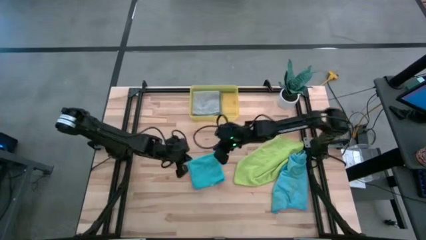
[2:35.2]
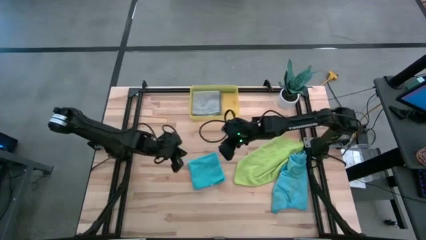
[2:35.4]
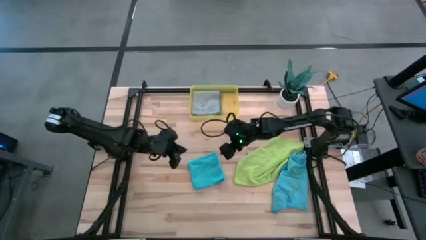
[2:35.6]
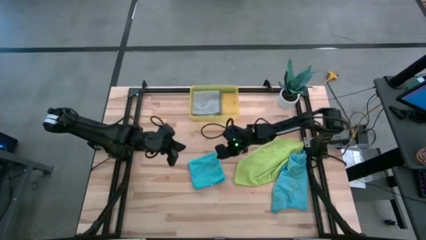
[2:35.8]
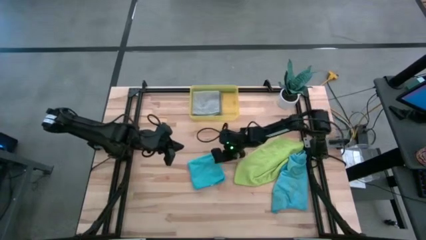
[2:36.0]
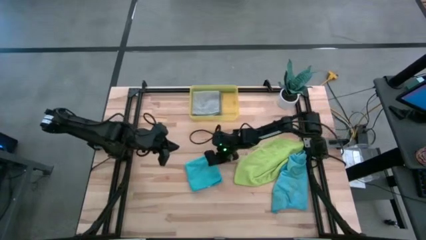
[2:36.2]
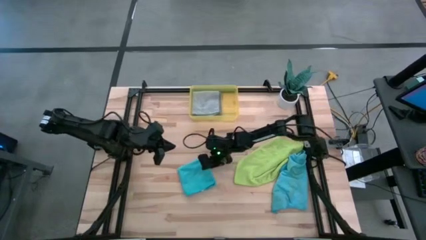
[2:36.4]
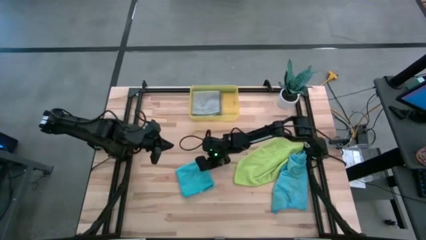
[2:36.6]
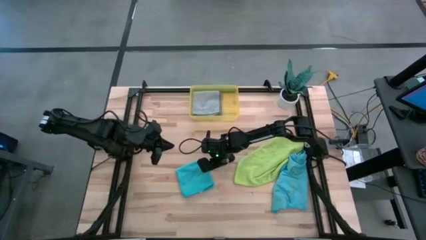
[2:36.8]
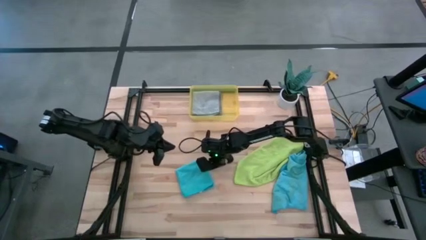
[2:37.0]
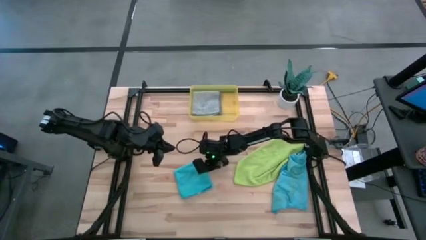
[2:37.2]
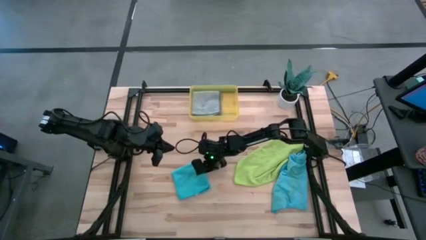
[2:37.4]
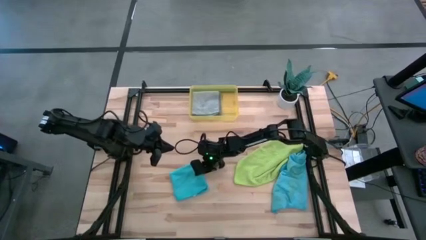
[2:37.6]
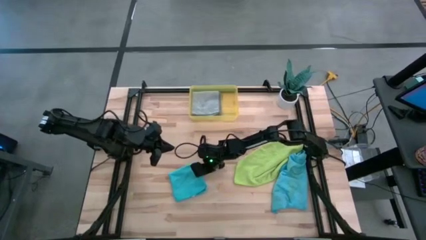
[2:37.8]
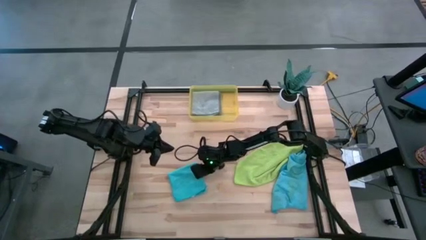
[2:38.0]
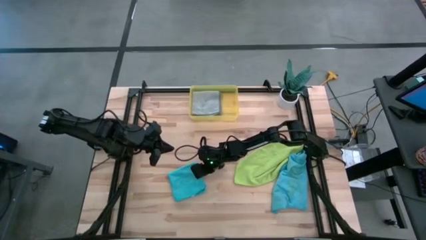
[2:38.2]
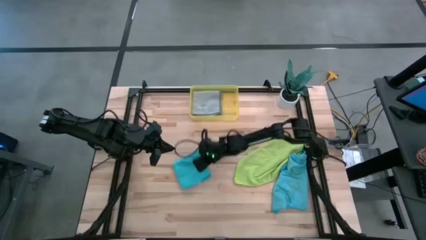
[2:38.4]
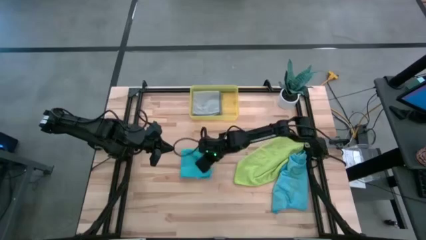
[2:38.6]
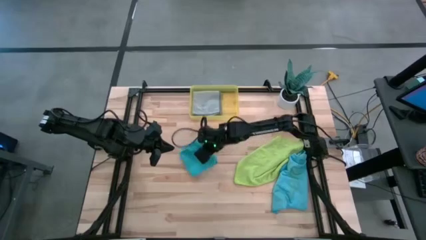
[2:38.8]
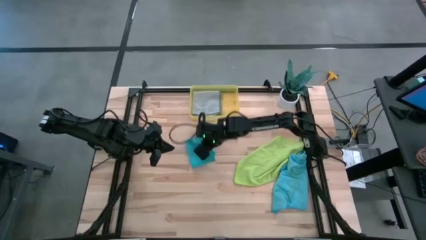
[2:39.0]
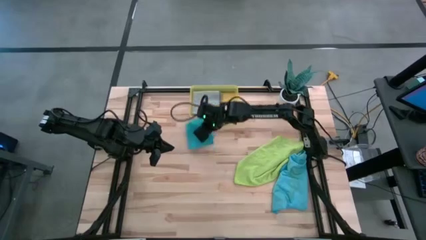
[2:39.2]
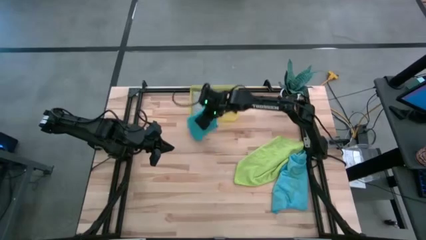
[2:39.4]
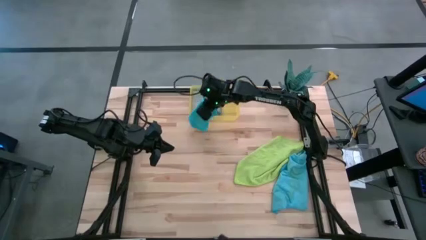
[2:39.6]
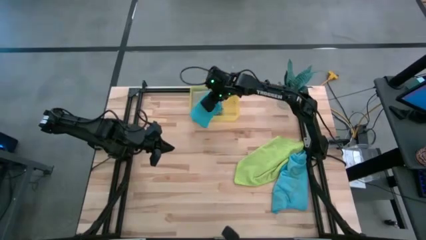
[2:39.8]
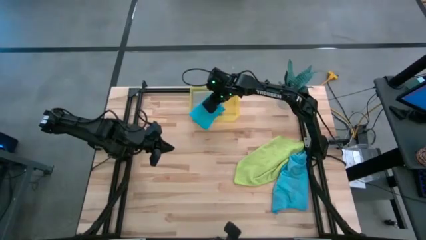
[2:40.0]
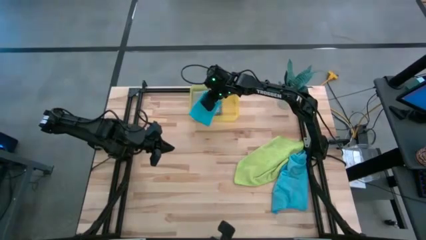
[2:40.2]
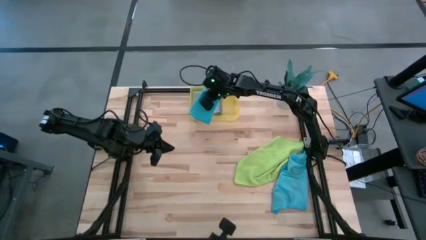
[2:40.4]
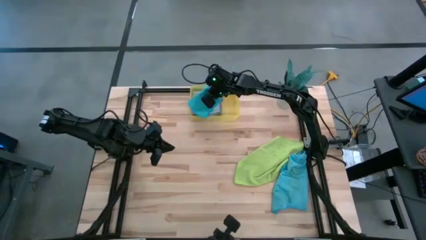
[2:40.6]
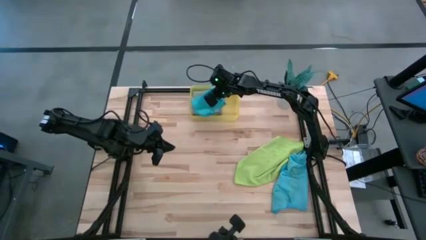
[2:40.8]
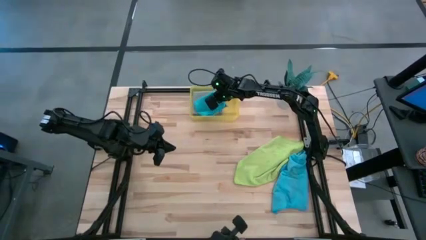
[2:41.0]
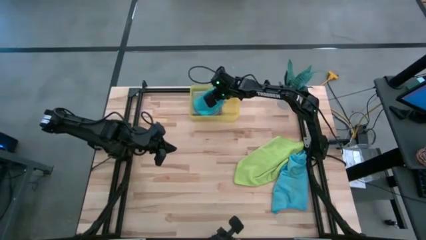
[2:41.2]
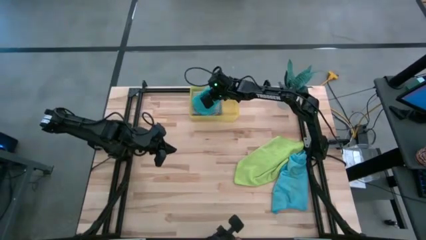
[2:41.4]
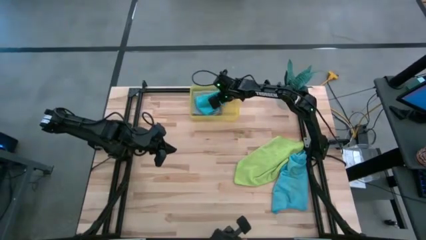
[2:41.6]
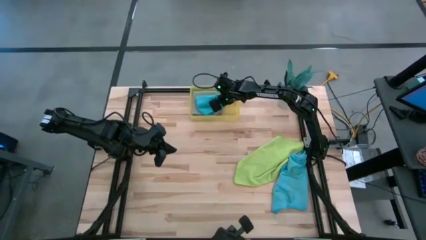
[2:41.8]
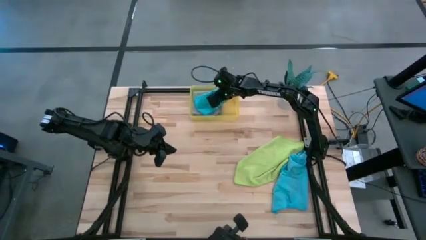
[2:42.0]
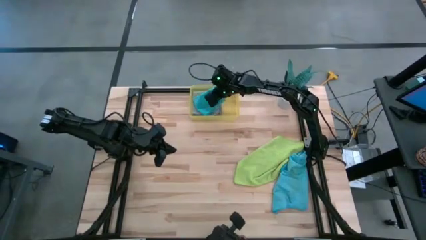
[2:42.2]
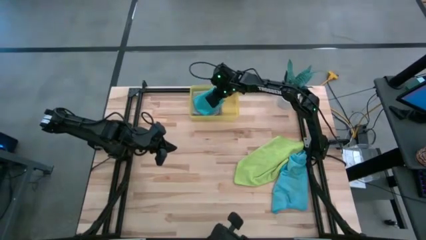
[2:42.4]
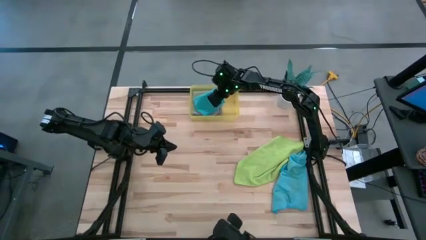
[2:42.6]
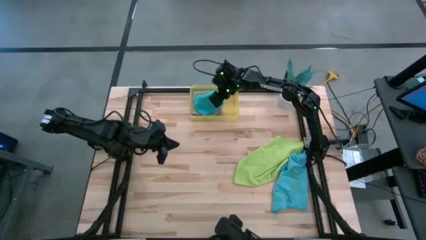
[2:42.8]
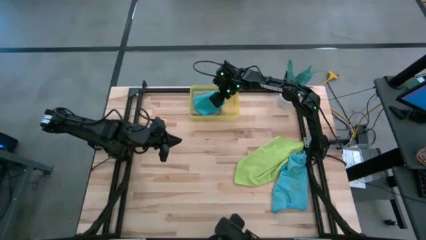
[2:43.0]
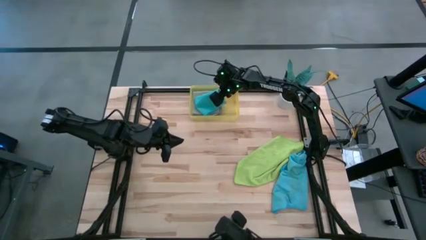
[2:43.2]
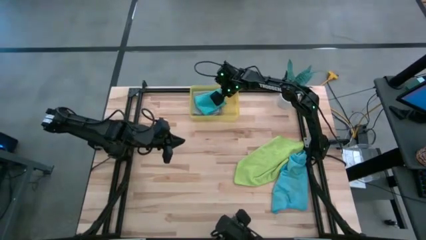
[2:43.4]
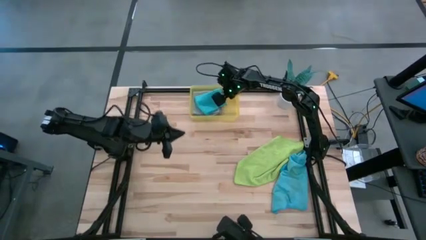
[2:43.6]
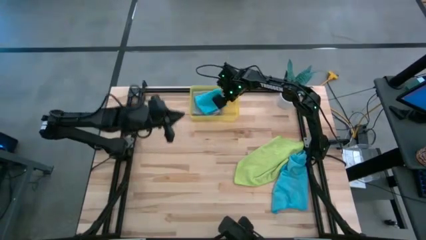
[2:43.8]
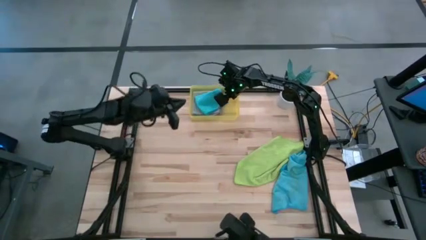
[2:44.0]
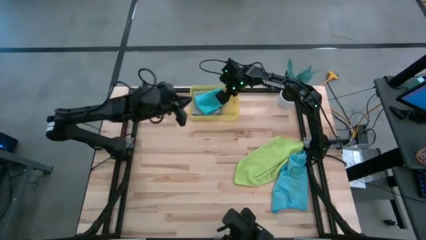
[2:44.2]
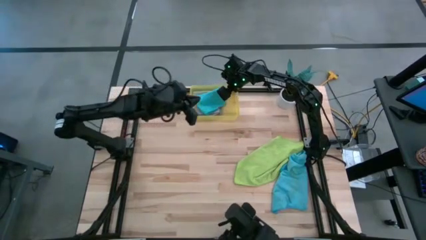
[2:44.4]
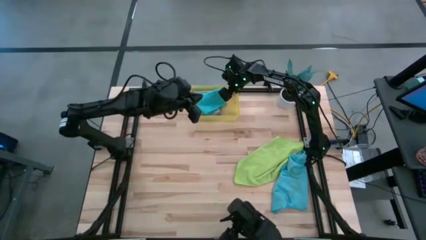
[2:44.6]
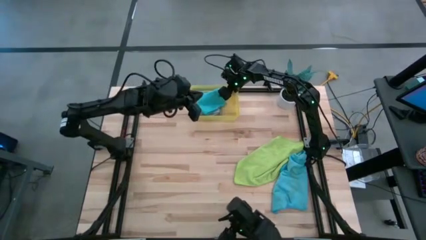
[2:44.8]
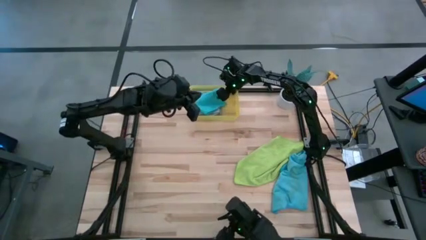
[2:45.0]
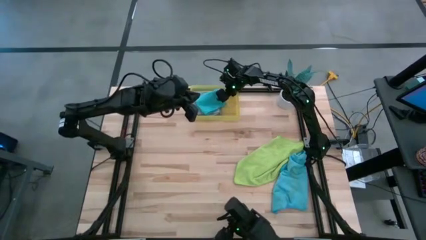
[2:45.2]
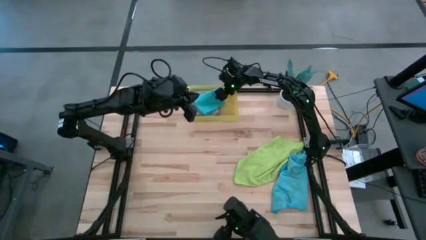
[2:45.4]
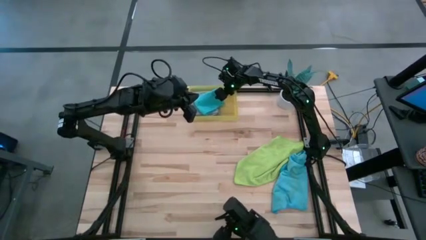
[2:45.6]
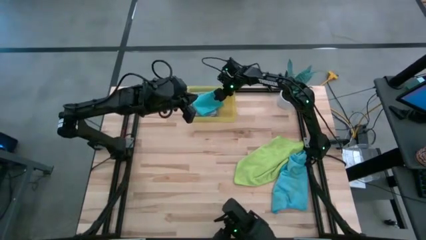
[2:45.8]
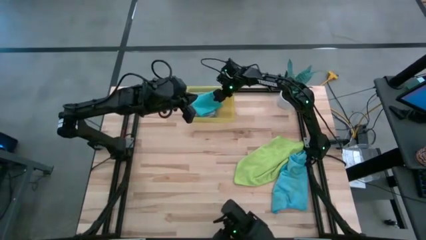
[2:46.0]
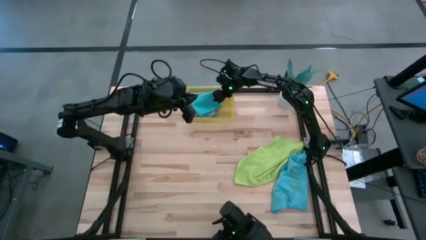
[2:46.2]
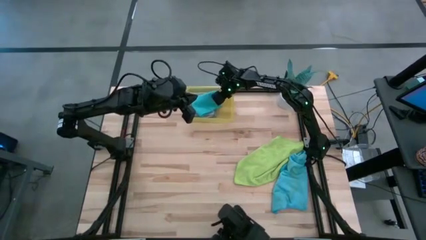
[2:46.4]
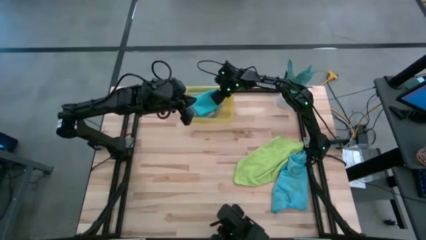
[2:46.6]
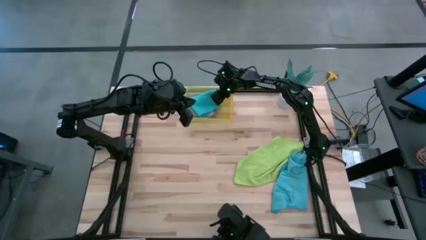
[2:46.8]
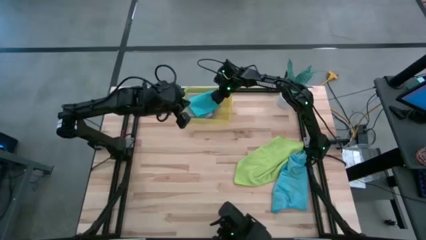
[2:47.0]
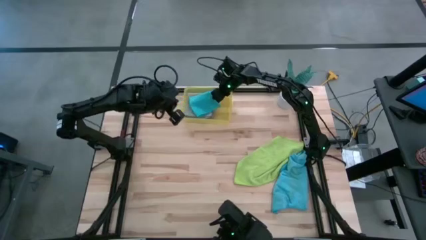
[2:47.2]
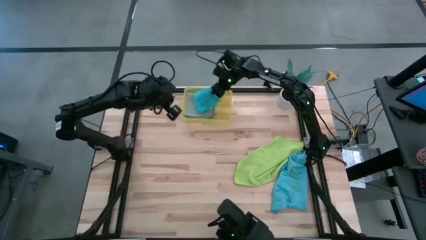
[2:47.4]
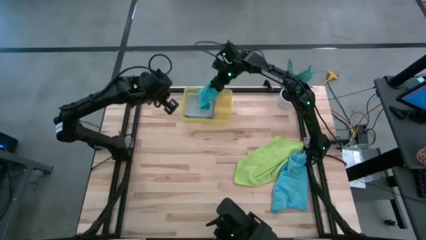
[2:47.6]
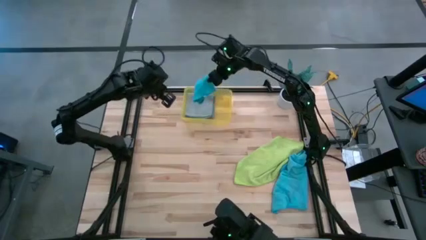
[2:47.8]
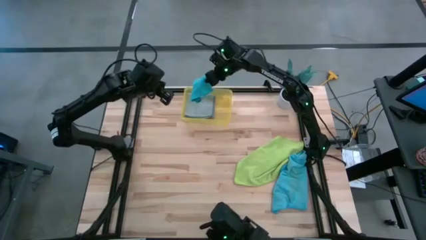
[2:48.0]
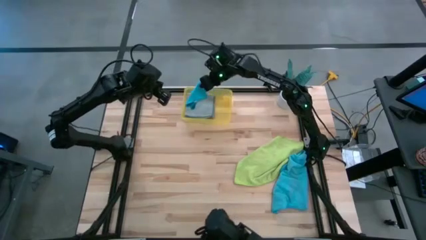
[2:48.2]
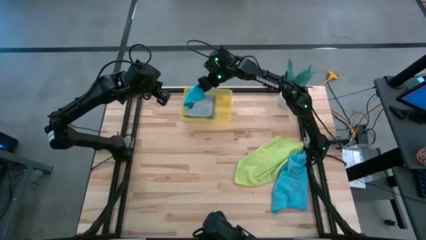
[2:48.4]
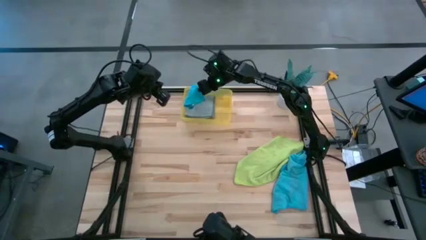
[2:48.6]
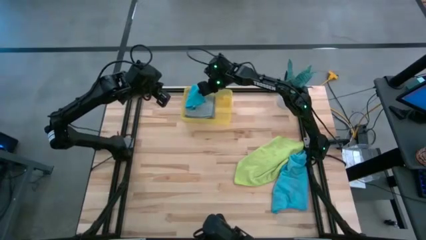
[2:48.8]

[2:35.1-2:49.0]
Task: Fold microfiber towels
Stack the blue microfiber cloth on the gray microfiber cloth in the bin

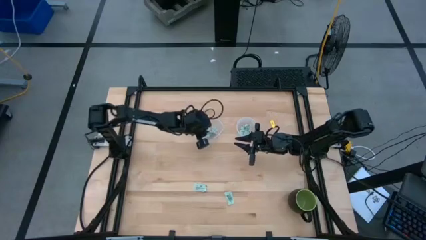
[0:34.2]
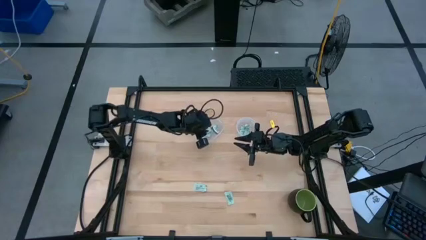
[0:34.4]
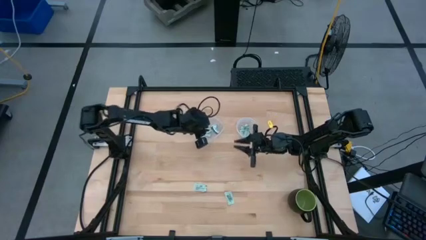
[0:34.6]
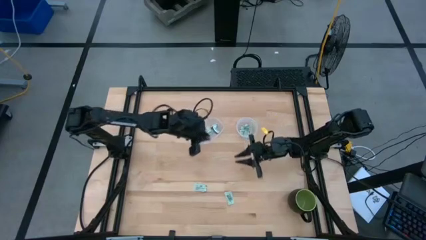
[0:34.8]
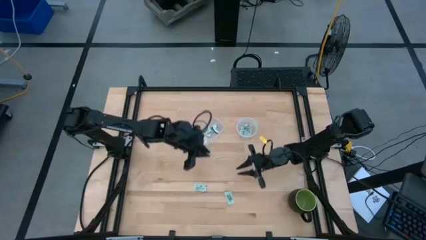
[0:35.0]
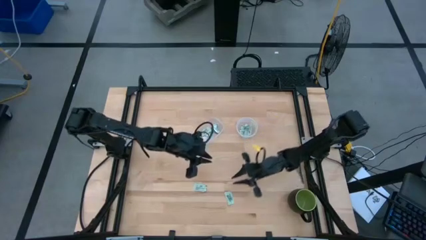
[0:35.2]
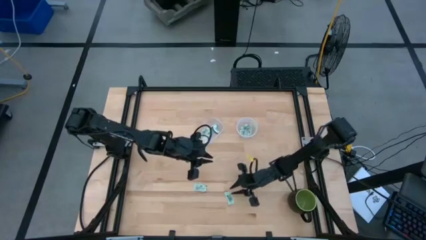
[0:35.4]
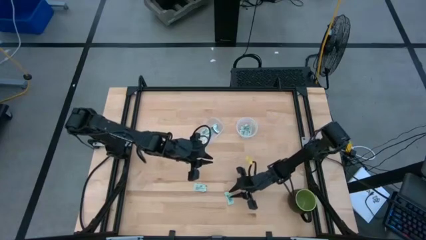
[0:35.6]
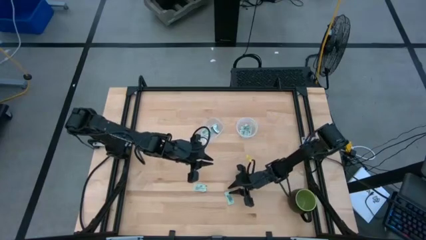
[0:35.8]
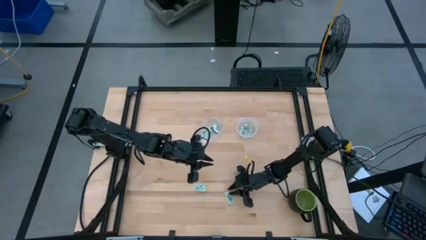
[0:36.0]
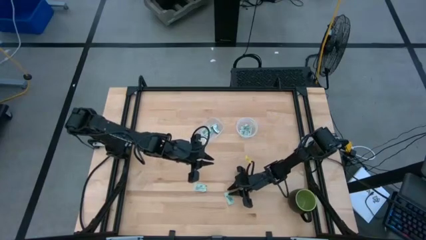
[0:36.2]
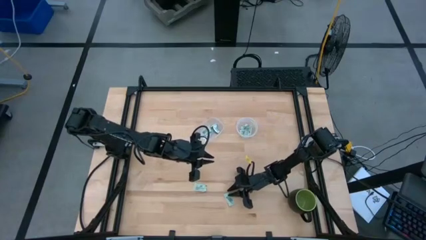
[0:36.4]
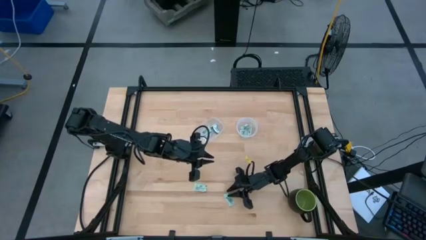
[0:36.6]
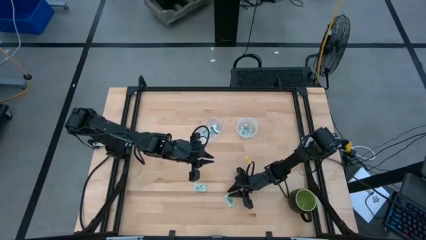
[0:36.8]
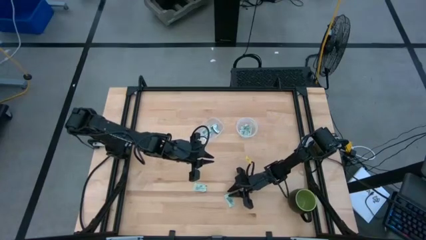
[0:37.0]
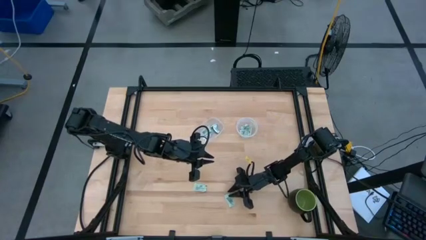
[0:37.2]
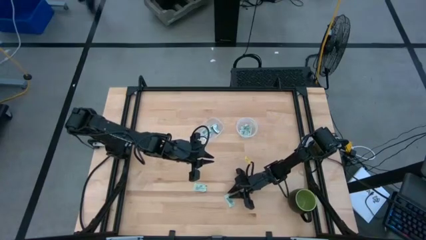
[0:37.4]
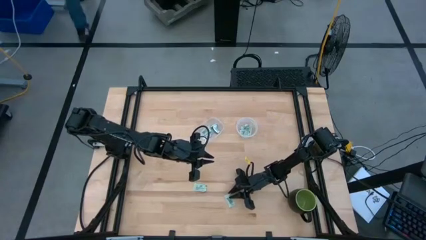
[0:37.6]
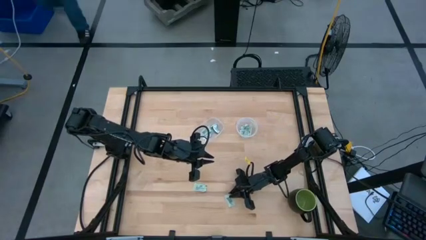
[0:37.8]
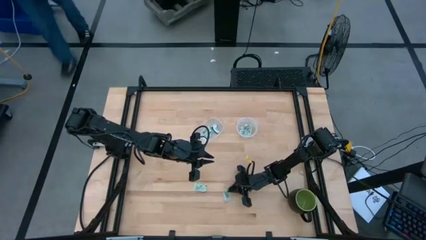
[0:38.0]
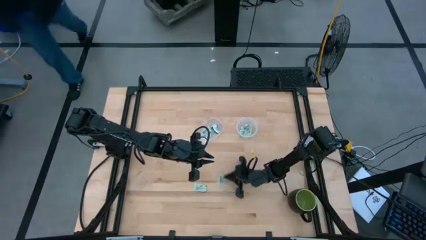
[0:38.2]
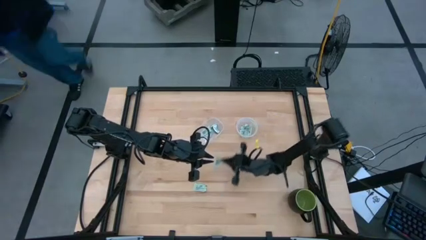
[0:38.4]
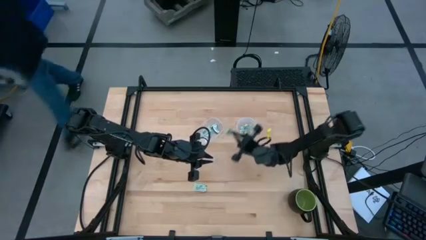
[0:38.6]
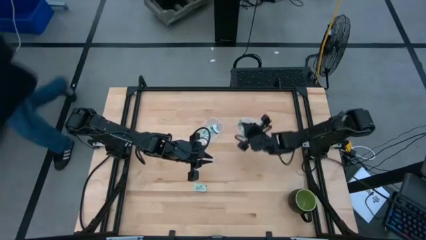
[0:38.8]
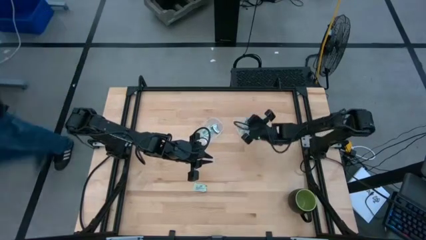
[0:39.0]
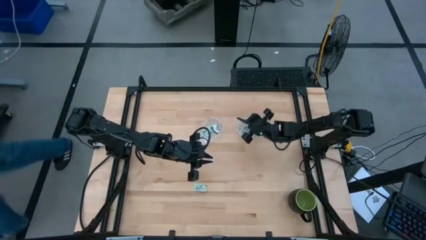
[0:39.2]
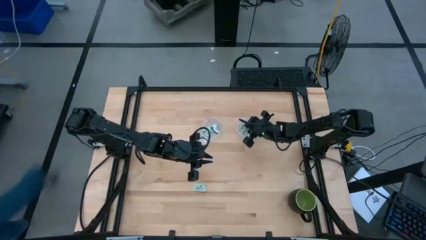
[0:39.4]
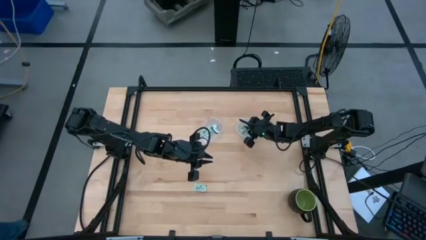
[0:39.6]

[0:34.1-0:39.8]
Task: Pick and place Stevia / Truvia into bins
Put the stevia packet into the right transparent container
